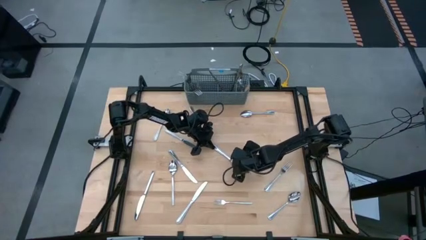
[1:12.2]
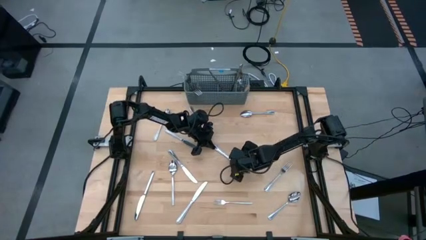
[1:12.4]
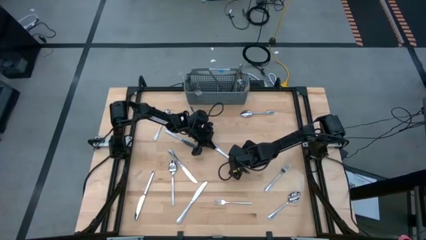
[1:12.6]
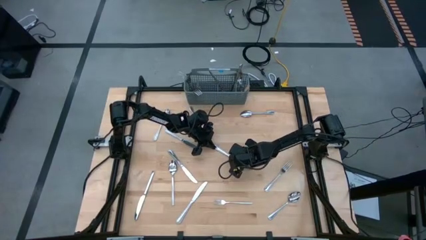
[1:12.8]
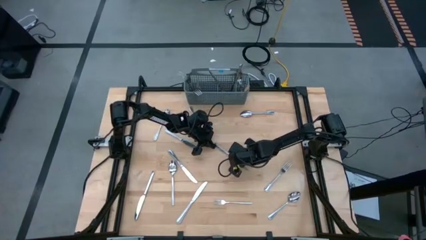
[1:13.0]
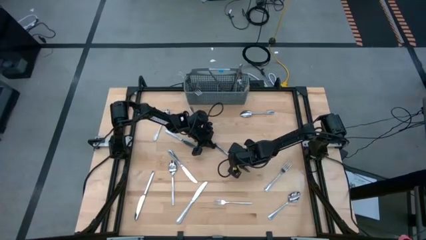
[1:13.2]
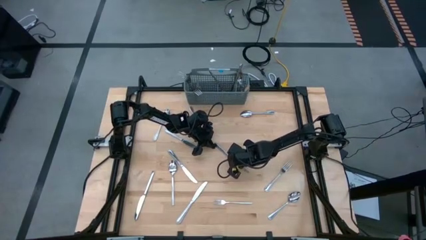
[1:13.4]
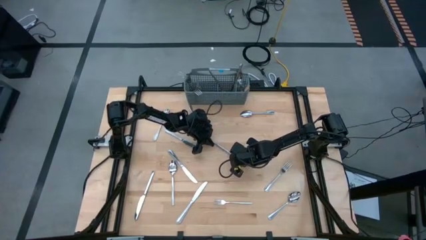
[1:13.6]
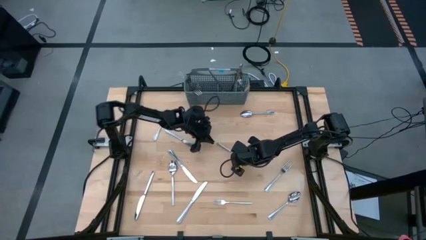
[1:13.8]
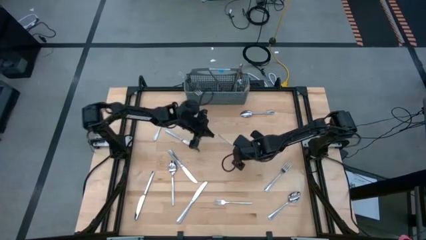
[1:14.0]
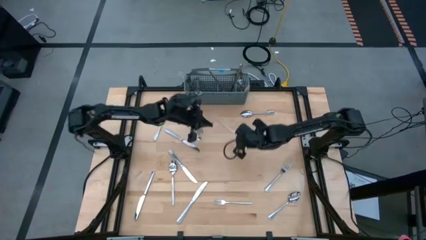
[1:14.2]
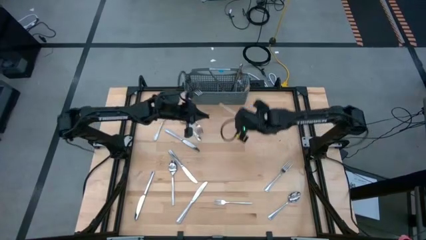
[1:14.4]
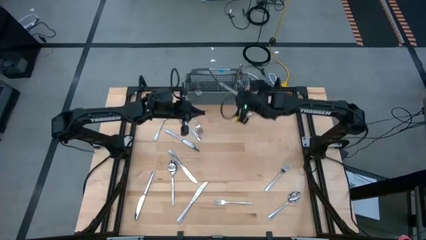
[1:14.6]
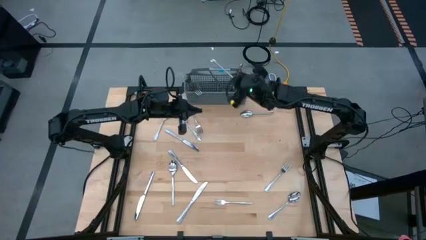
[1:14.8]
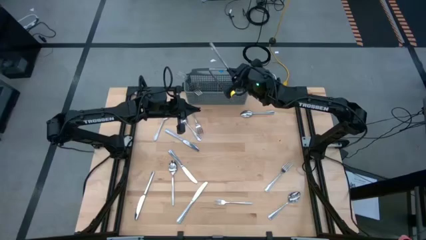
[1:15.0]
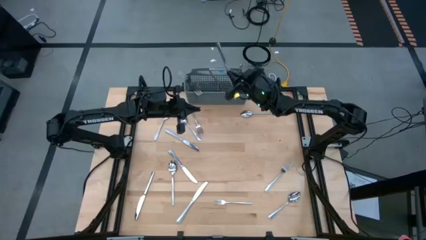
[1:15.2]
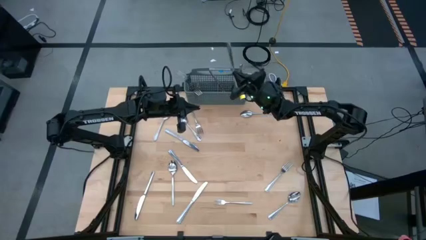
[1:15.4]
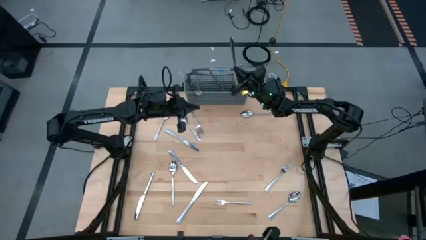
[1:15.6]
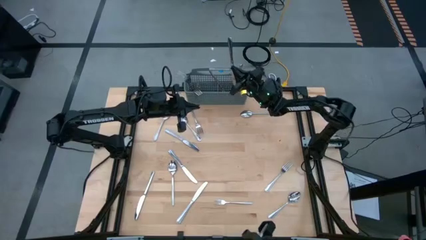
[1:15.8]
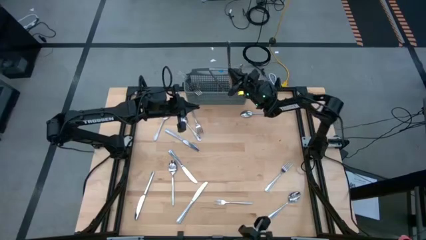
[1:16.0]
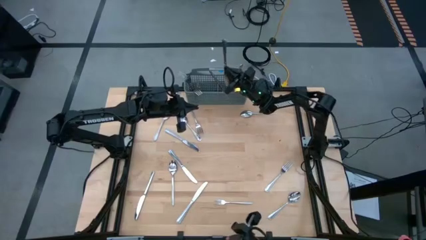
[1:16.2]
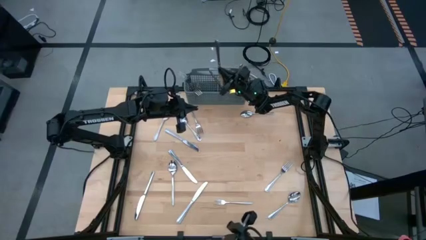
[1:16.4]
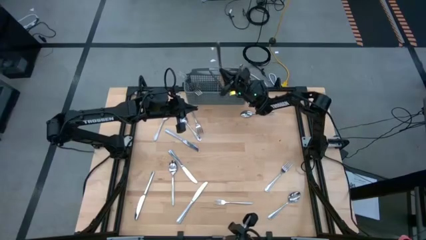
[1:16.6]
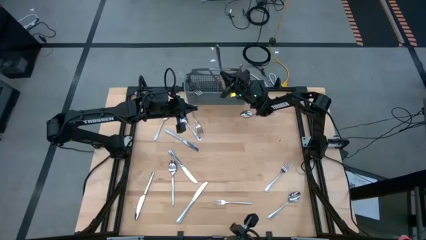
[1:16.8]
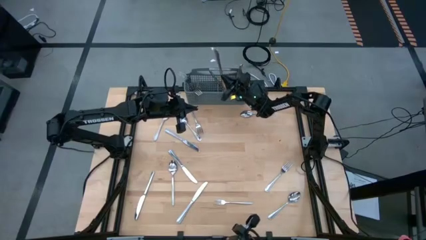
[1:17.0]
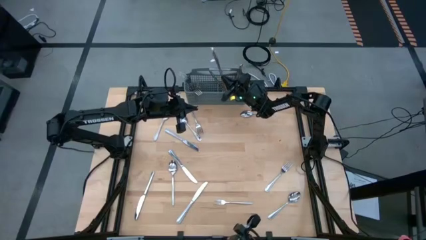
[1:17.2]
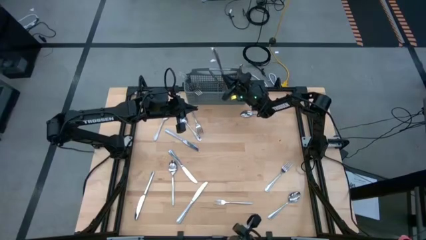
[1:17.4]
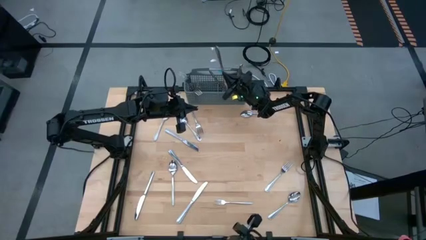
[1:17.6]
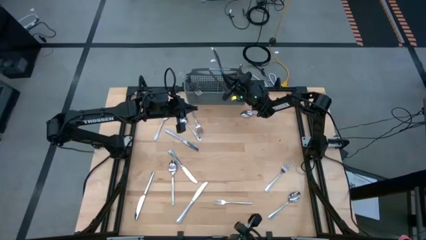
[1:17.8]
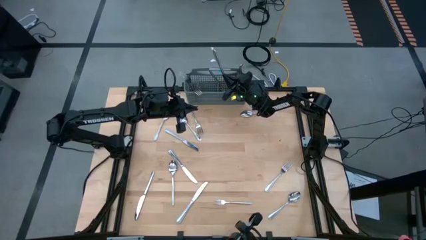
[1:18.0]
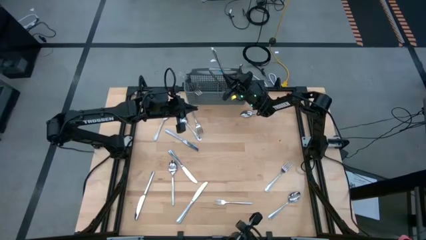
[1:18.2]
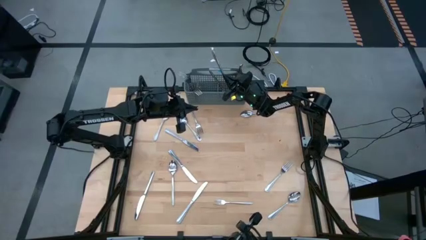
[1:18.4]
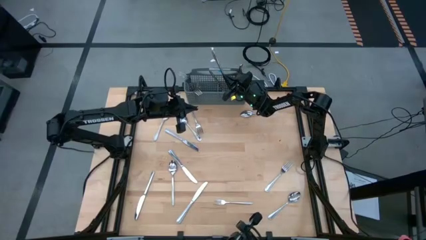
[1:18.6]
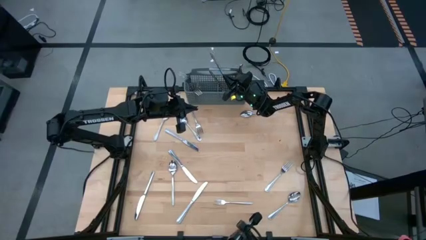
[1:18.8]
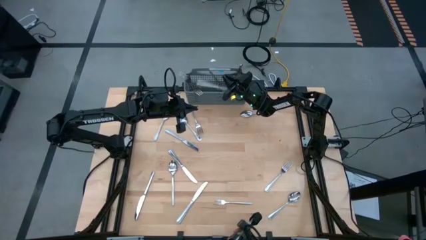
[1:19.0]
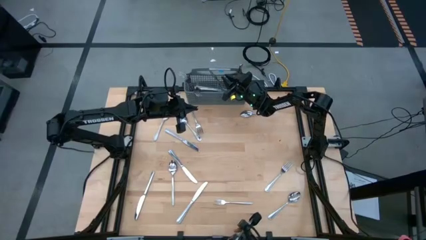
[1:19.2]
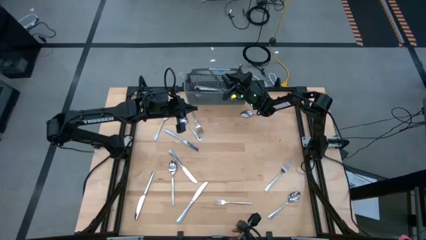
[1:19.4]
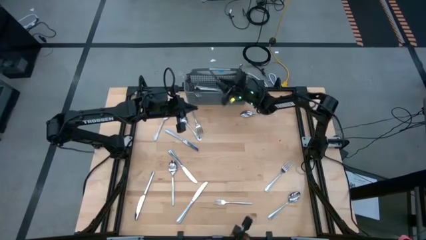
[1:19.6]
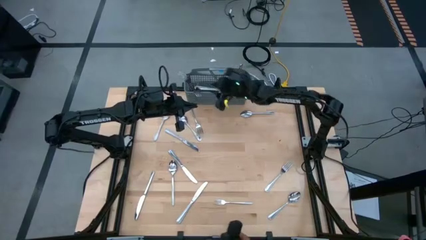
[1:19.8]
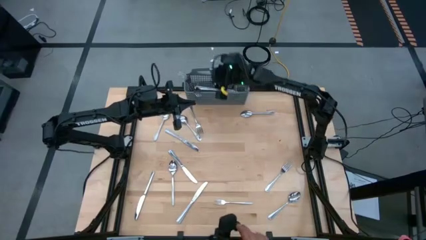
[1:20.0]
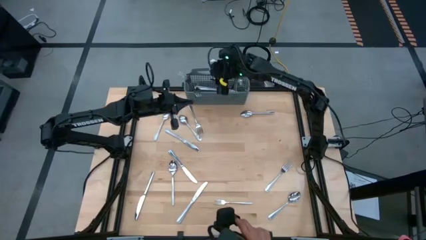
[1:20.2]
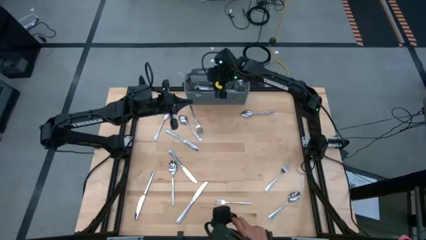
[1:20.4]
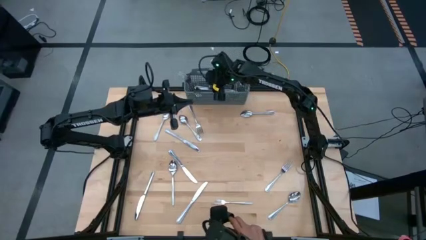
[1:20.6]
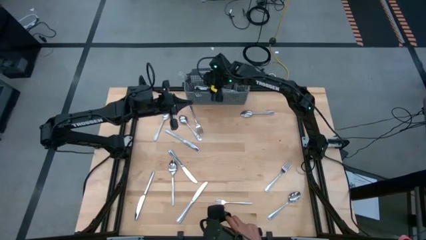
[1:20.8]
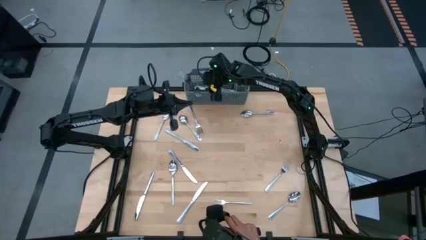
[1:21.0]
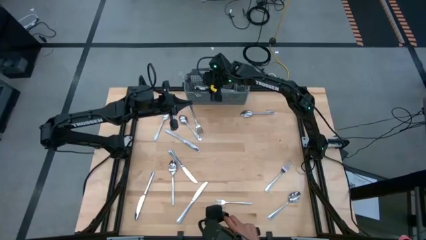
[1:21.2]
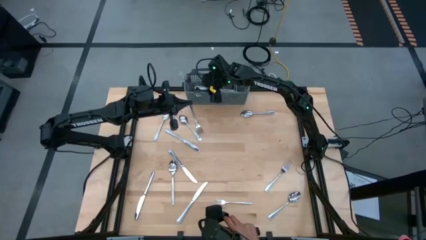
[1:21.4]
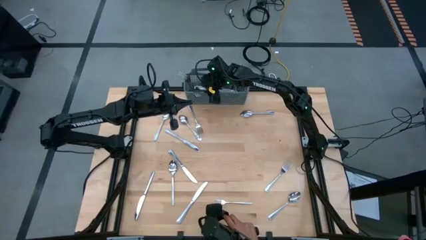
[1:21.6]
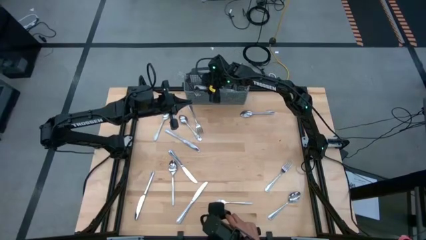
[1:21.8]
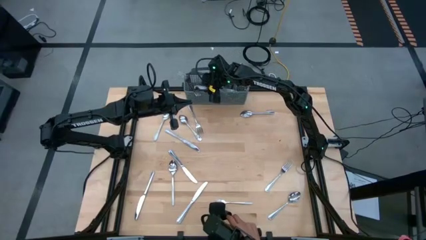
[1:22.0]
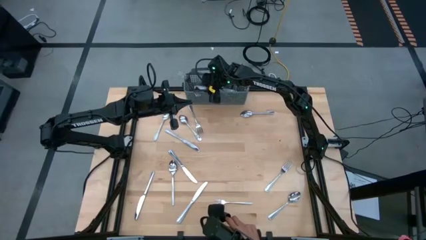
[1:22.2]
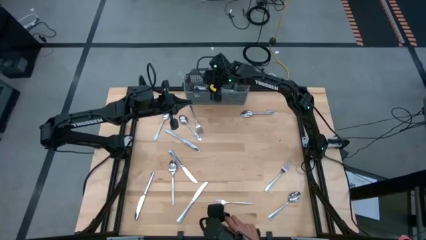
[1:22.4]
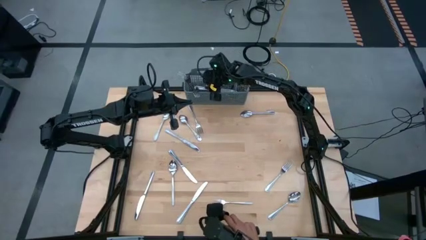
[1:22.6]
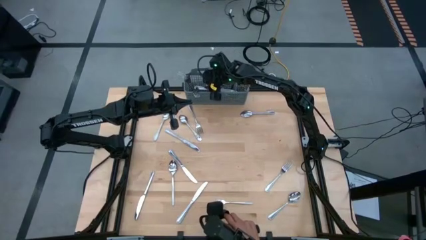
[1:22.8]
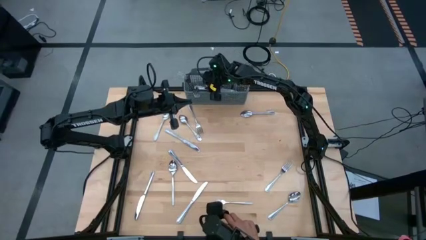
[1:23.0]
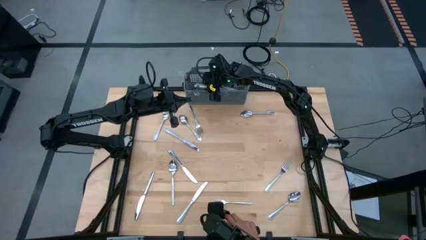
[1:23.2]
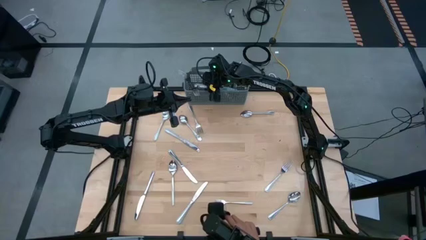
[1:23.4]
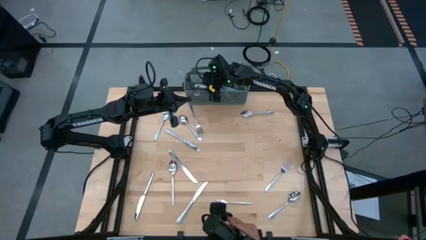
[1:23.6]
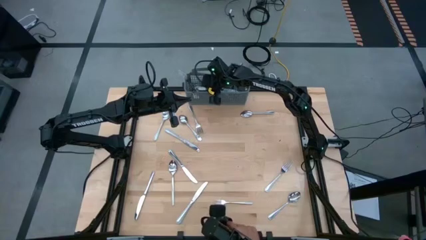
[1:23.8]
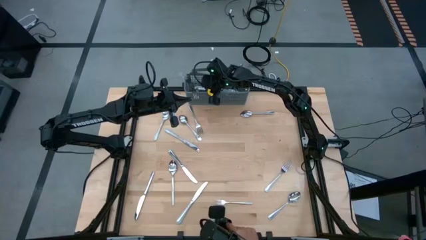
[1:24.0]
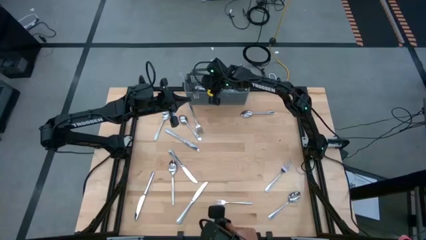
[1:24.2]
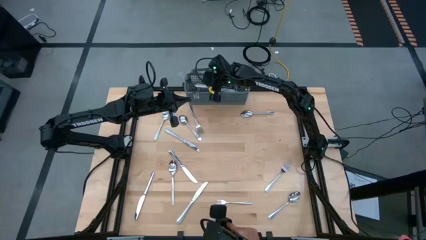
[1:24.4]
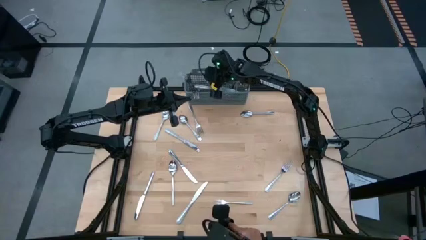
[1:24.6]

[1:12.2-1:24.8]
Task: Sort silverware
Put the silver table knife into the silverware organizer

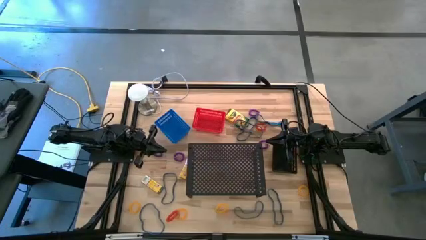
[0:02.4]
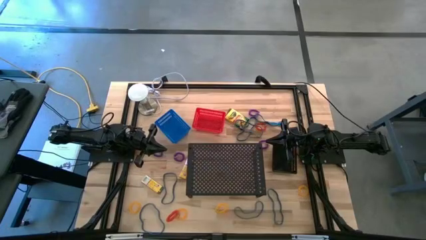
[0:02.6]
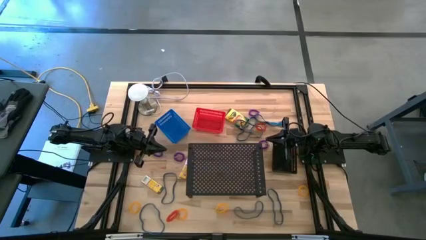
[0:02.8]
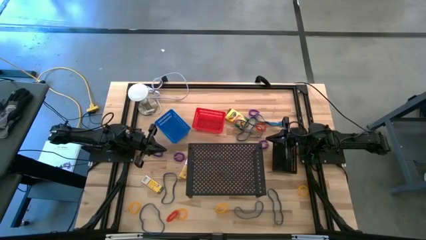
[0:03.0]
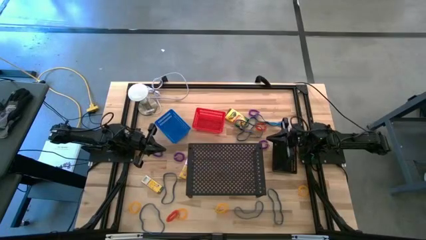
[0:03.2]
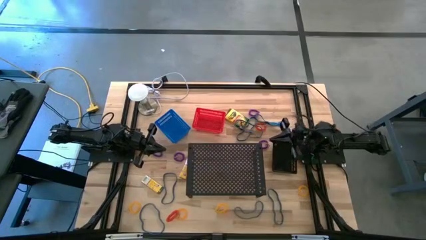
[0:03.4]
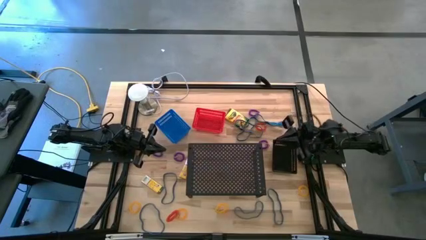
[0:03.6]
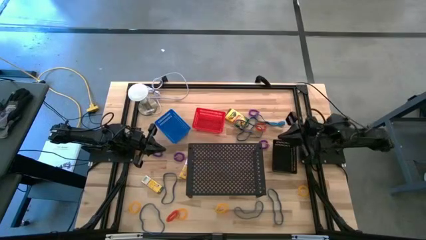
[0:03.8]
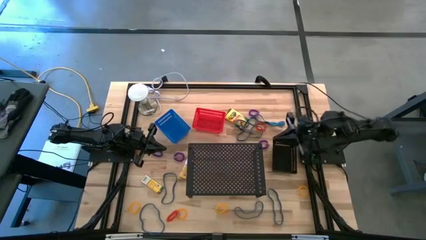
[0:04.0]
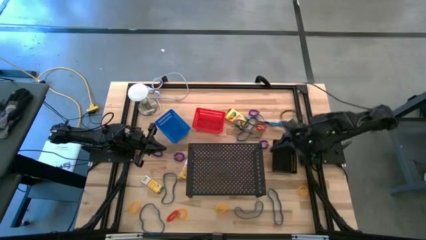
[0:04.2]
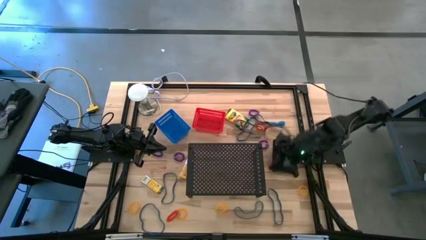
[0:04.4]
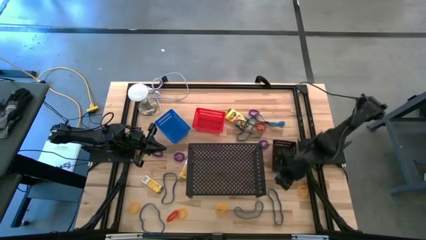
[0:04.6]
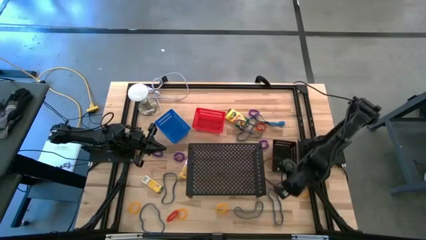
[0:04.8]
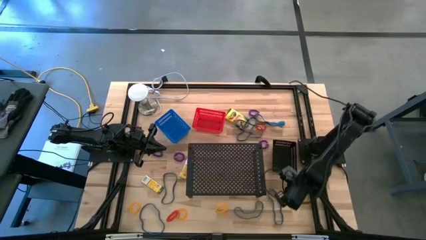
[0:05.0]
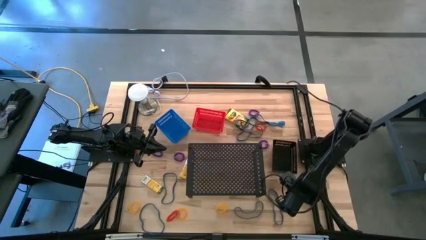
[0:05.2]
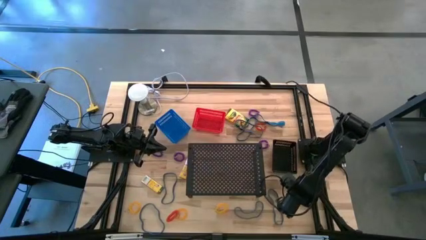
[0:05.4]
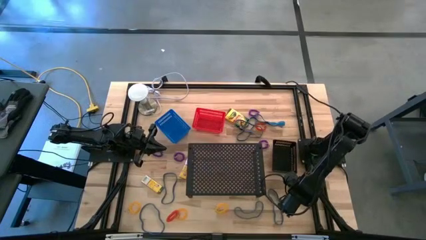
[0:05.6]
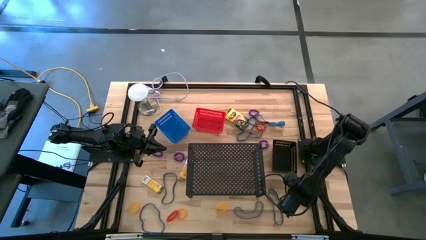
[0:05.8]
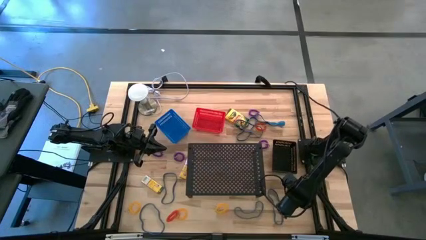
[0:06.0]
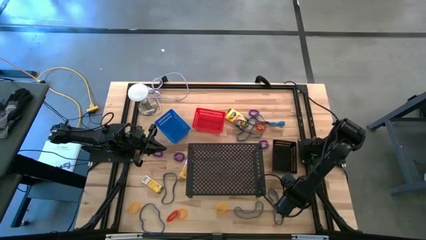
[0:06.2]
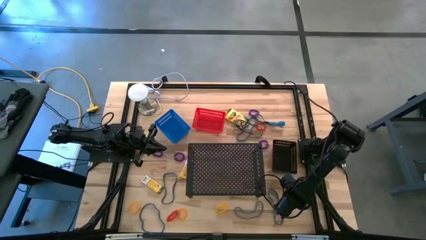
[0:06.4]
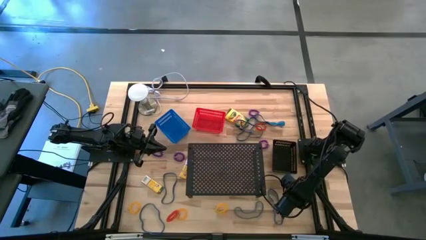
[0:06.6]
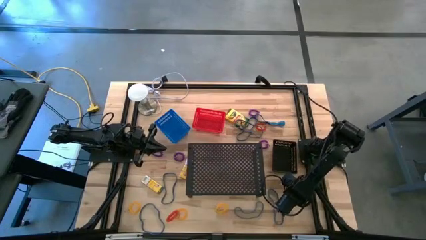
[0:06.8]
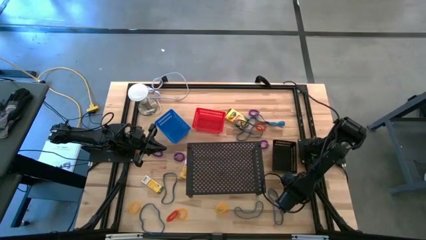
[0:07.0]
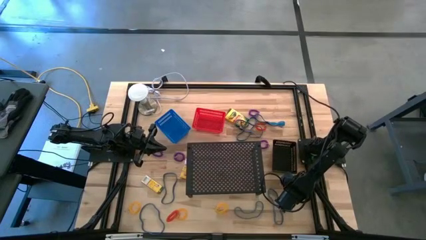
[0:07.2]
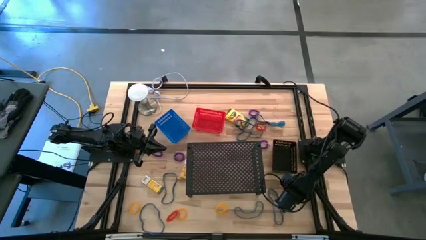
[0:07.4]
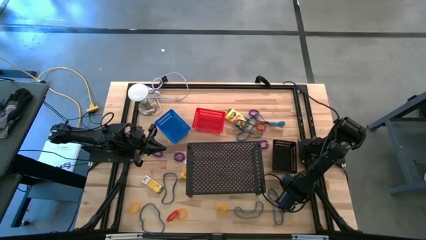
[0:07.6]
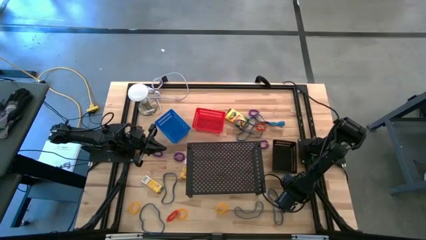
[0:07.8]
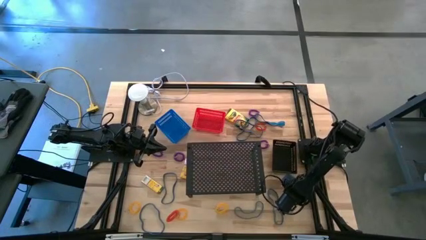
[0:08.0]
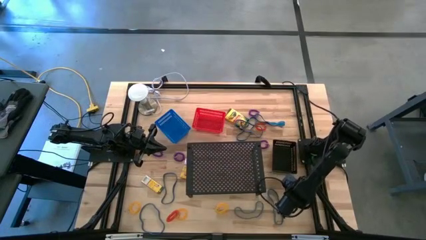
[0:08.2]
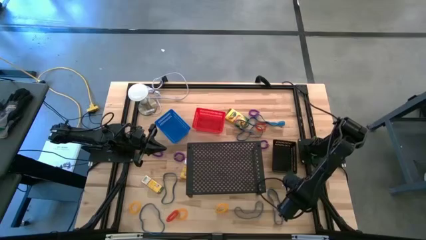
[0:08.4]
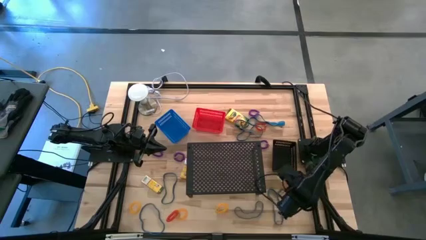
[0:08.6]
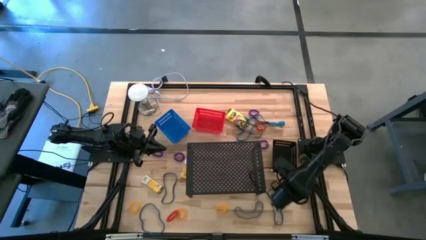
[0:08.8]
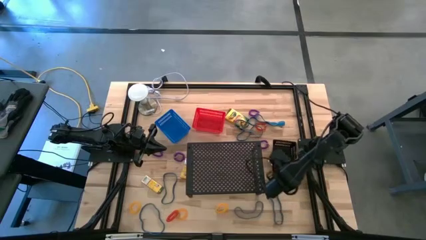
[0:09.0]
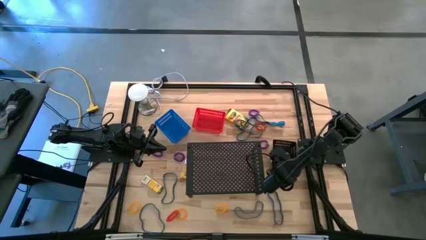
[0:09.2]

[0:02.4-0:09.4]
Task: Pick & Place Office Desk Supplies
Put the yellow spring keychain into the black bin
